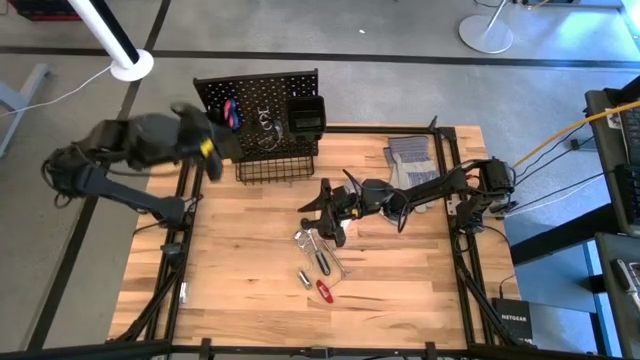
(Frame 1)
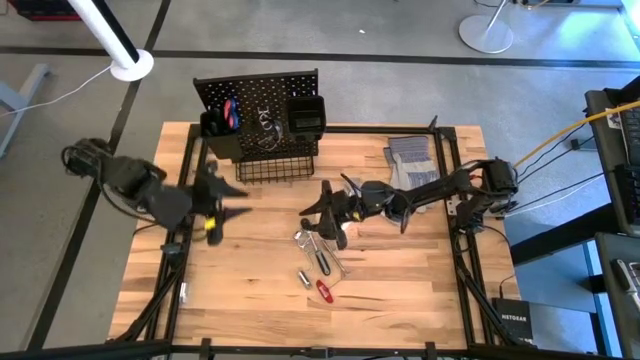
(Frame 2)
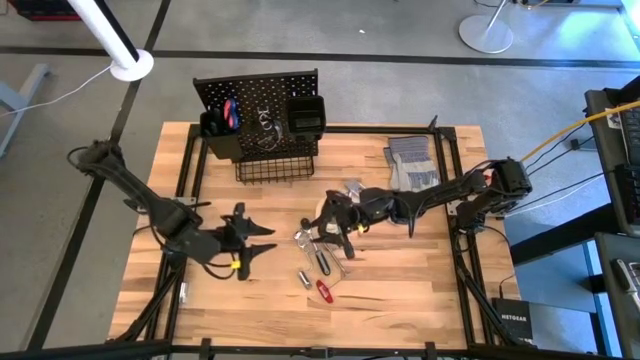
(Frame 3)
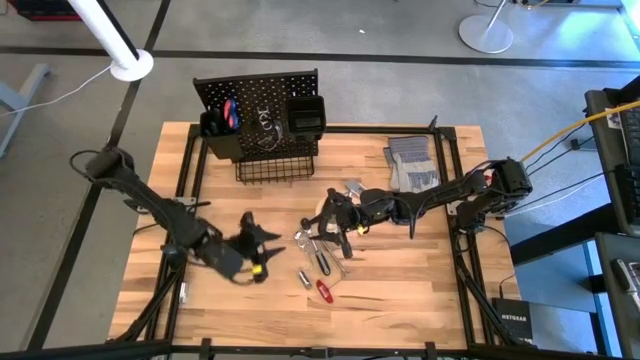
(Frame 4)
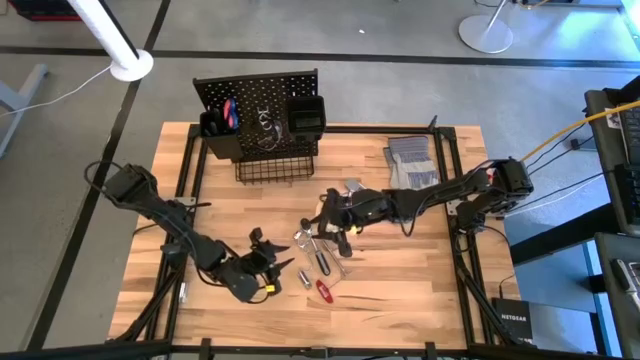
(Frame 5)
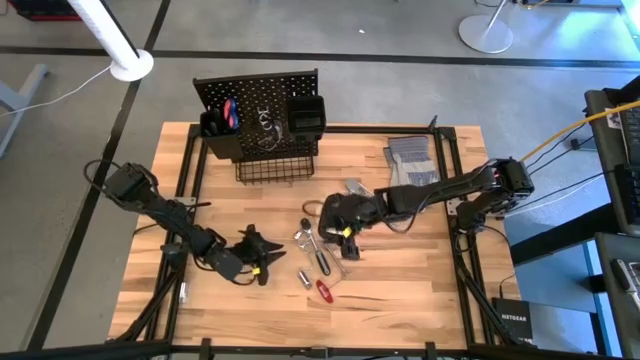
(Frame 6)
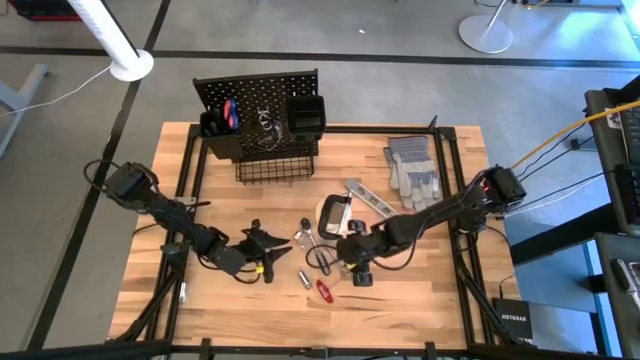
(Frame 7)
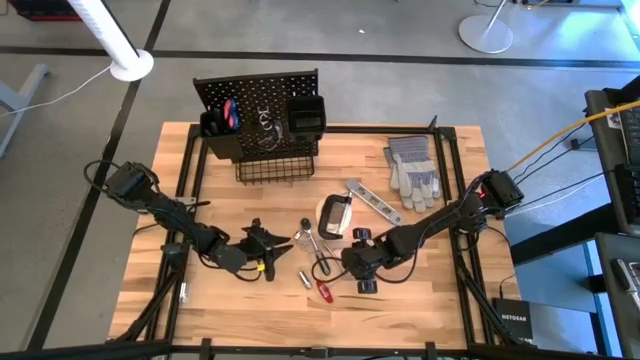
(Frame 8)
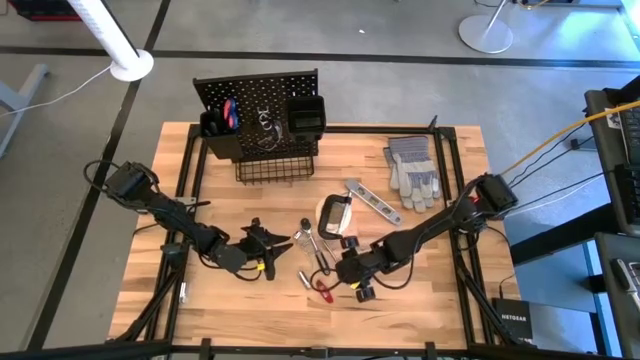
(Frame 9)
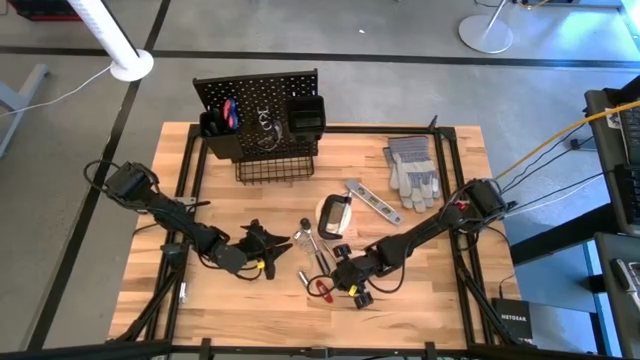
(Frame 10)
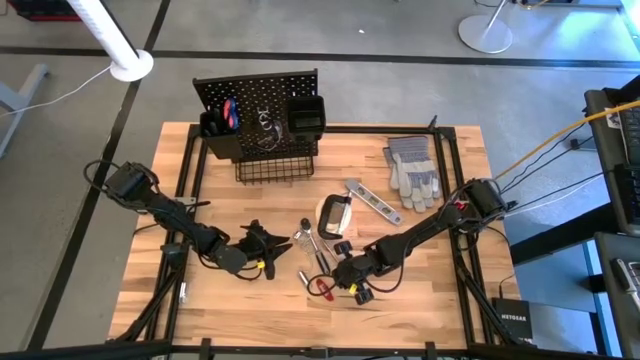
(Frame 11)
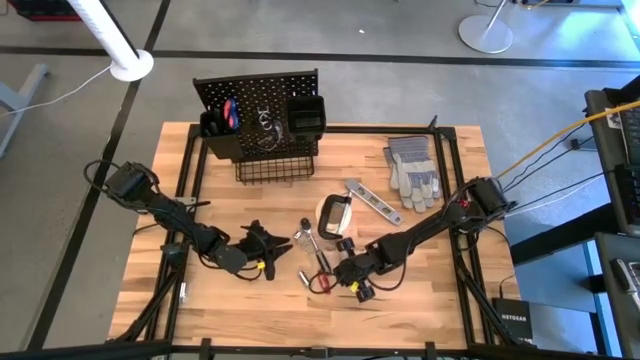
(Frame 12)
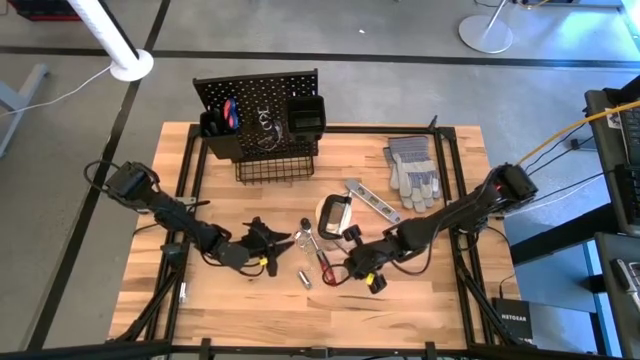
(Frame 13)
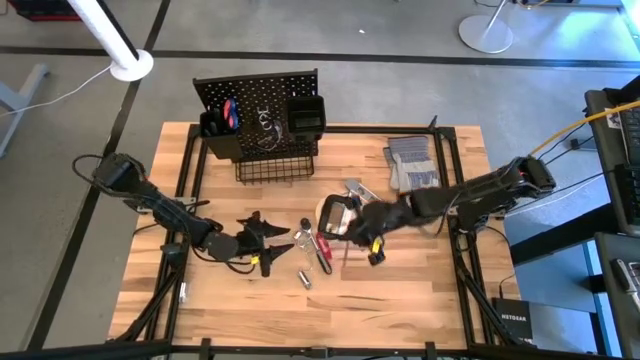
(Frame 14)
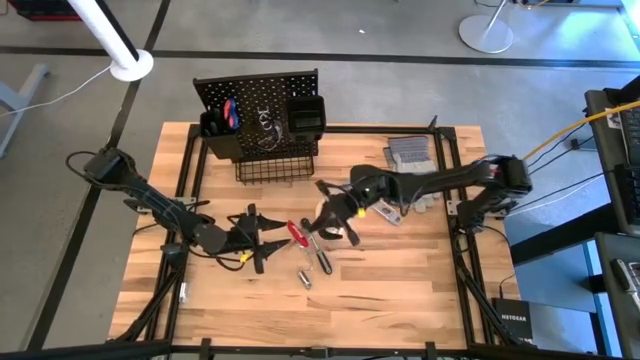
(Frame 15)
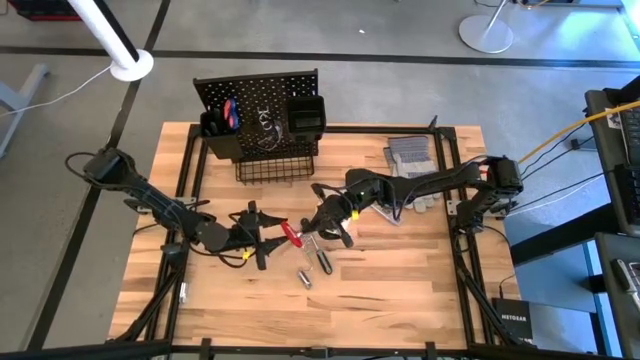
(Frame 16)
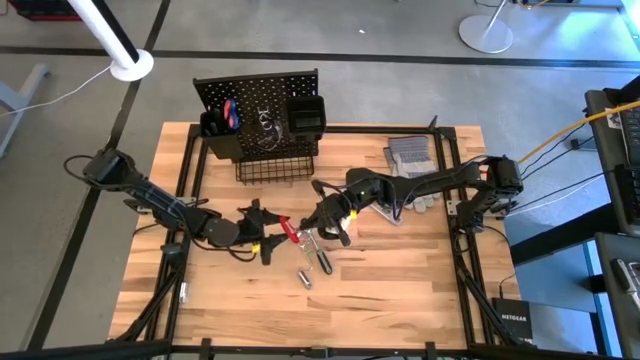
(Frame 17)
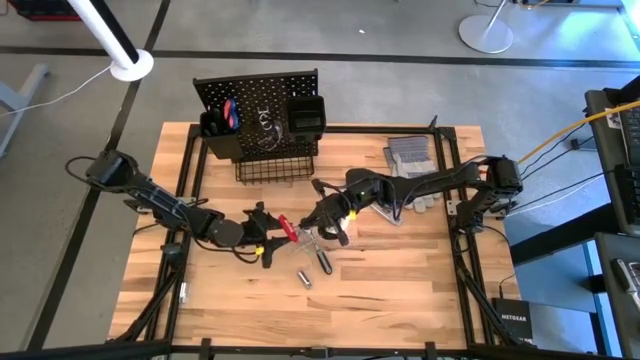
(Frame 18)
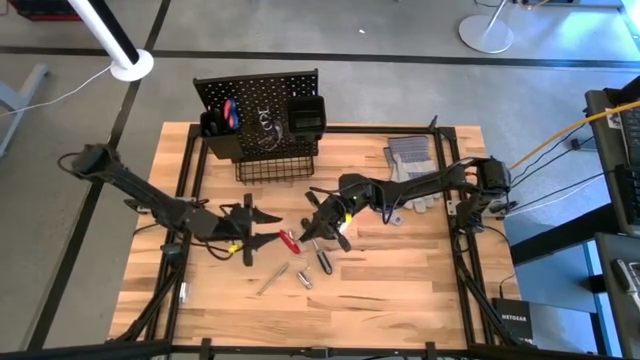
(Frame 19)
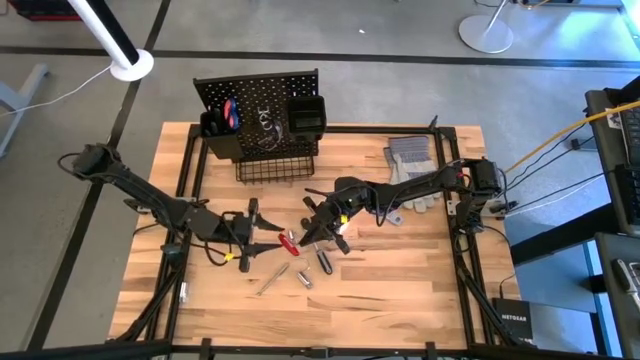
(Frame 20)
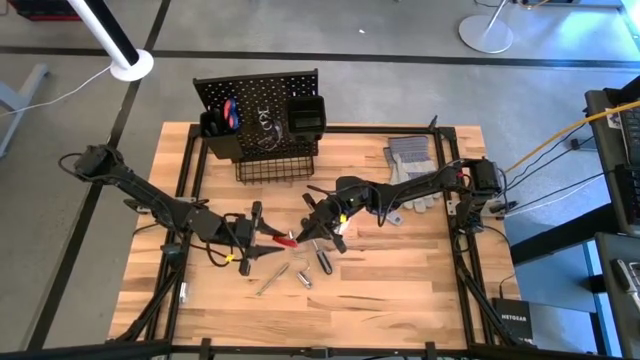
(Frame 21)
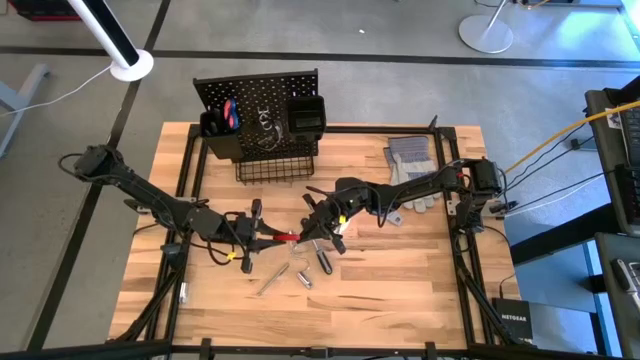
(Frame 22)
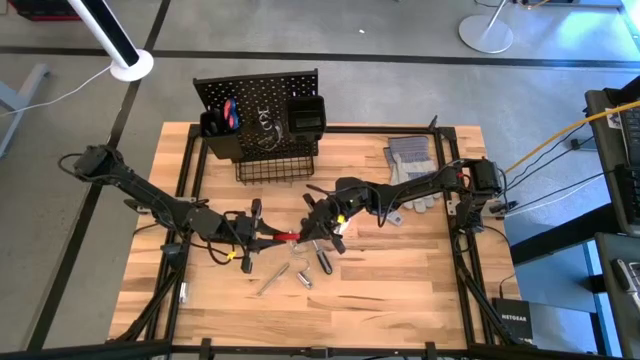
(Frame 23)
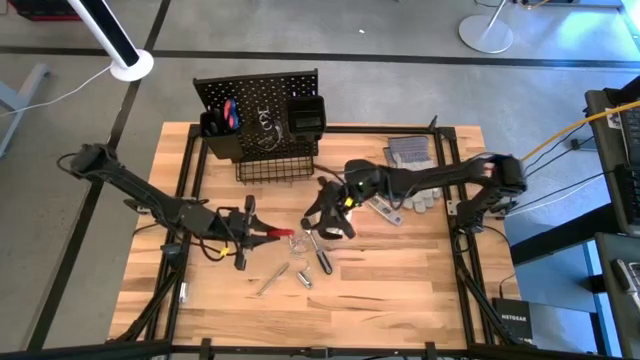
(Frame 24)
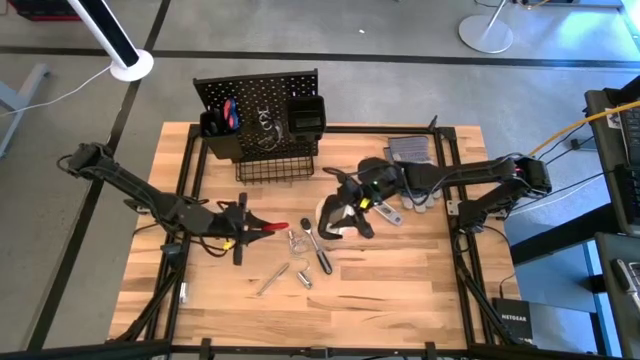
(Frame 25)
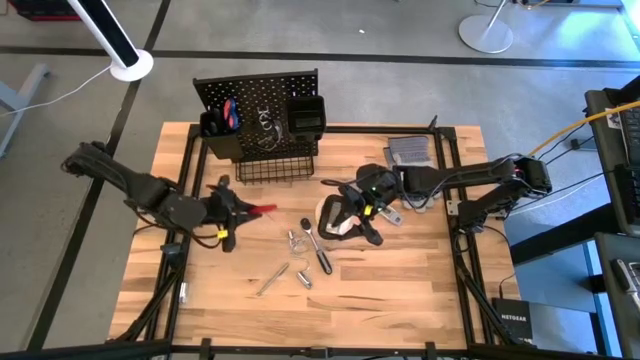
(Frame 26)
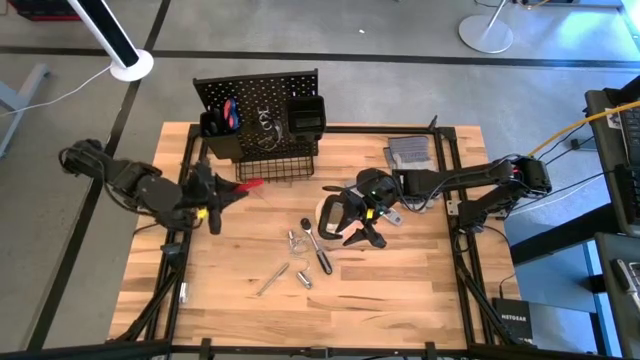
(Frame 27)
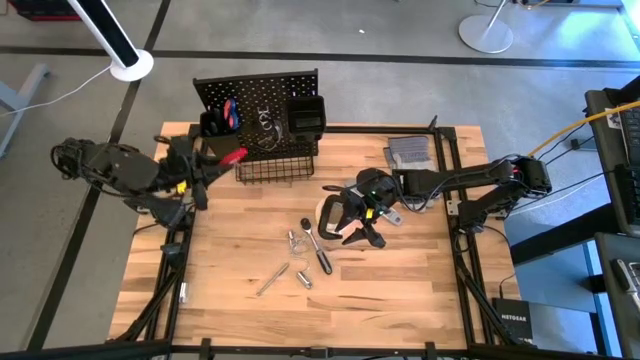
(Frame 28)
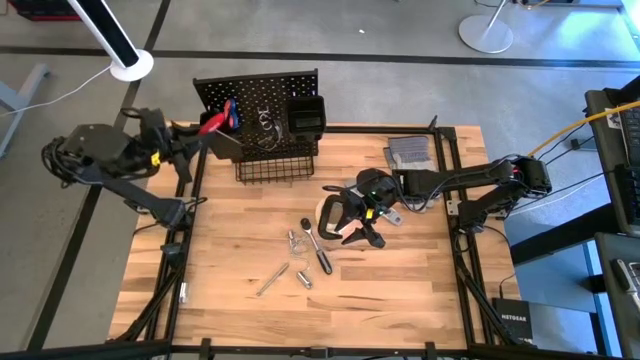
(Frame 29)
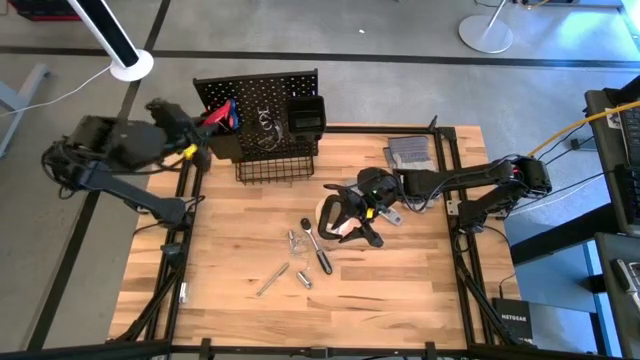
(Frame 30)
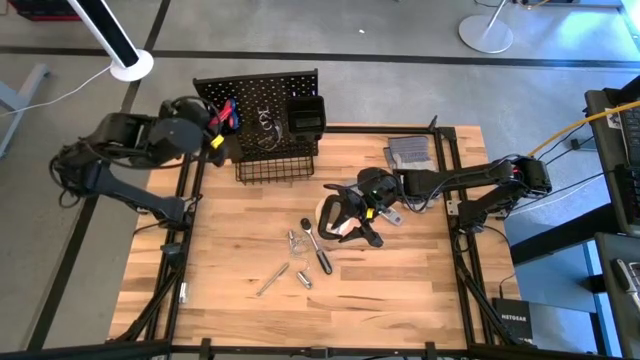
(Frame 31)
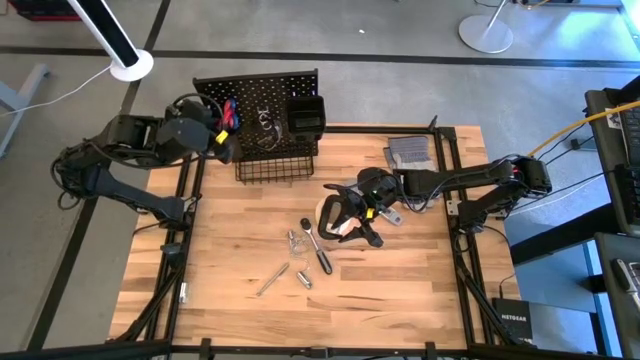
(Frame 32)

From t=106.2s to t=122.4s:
Task: Hang tools onto peg board
Put the red allen wrench into the left black bin on the pegboard

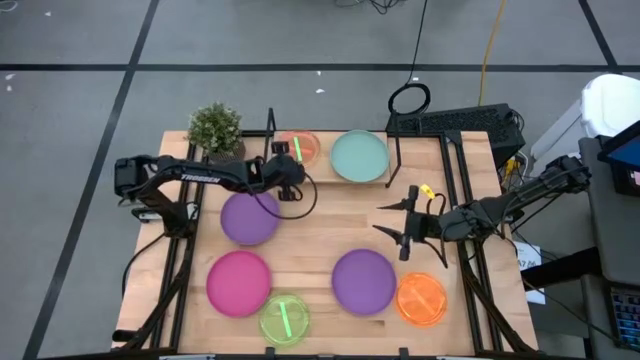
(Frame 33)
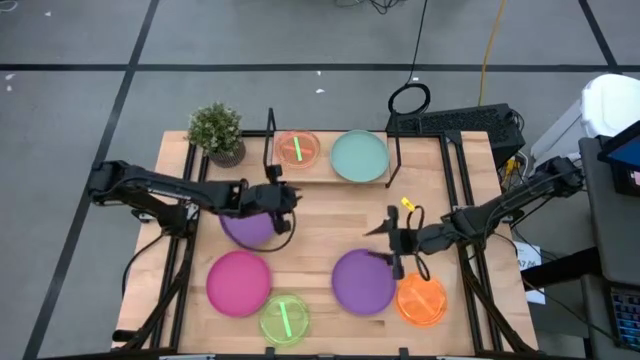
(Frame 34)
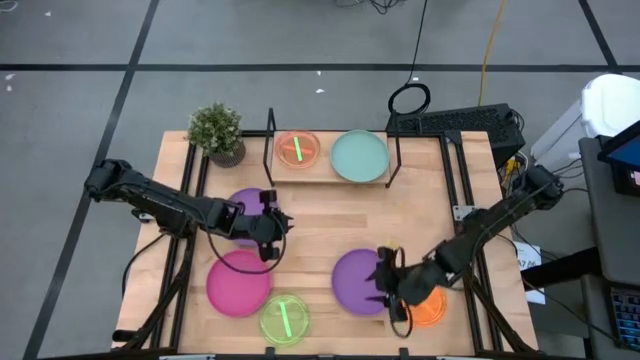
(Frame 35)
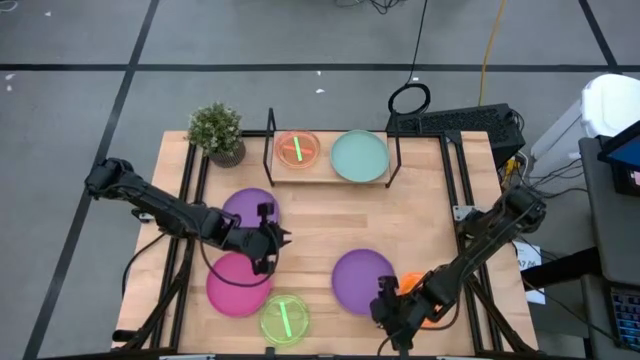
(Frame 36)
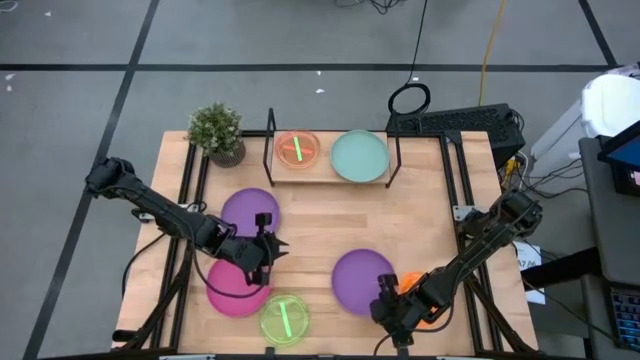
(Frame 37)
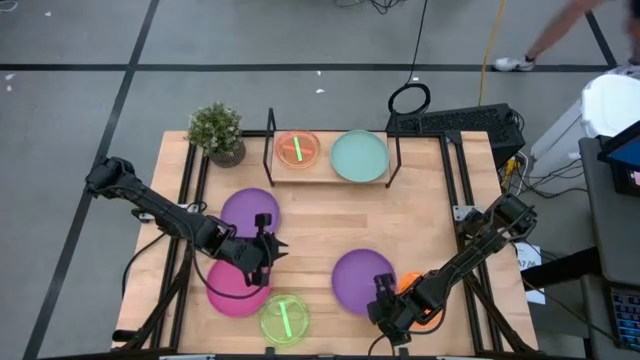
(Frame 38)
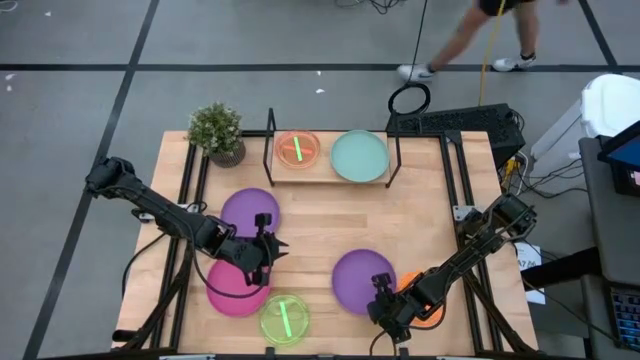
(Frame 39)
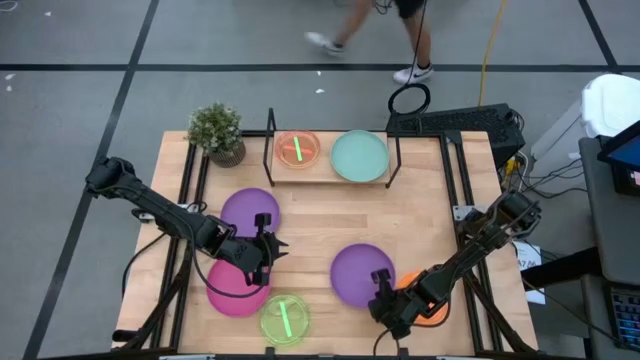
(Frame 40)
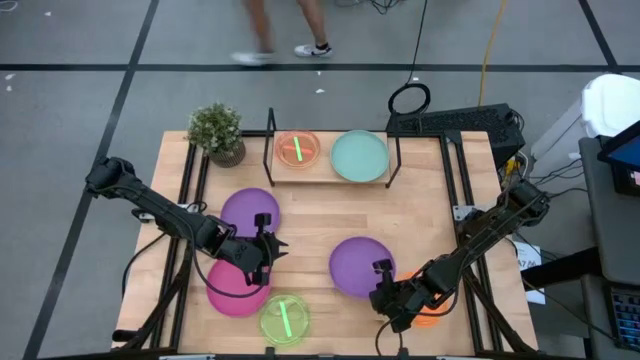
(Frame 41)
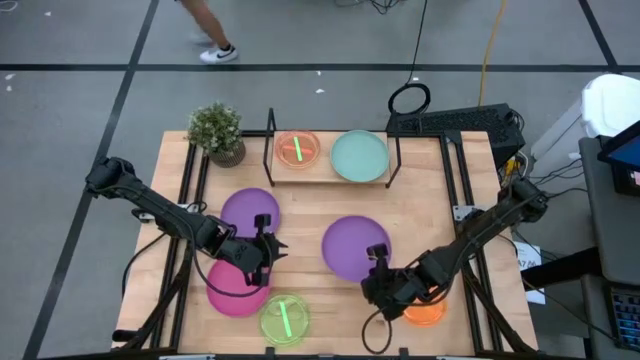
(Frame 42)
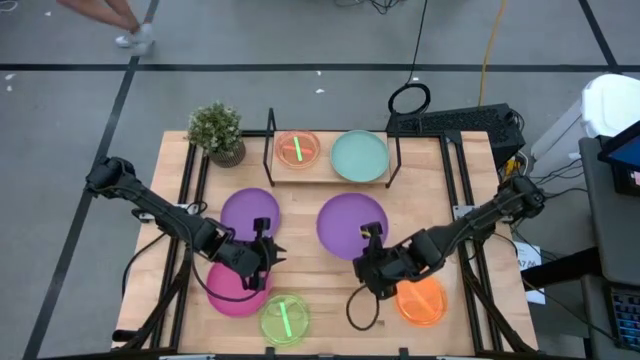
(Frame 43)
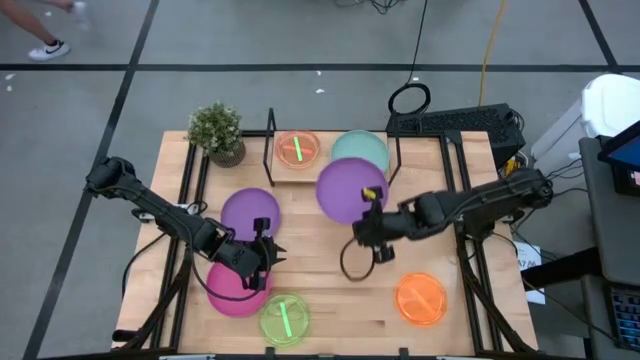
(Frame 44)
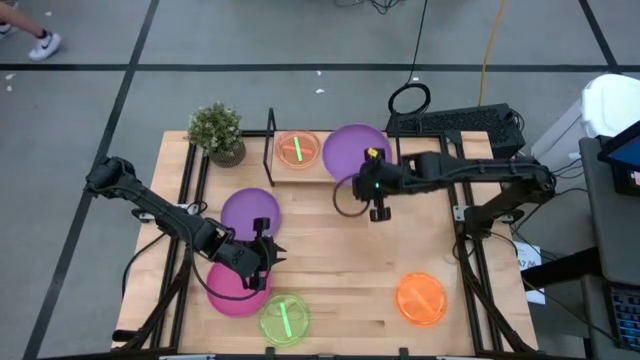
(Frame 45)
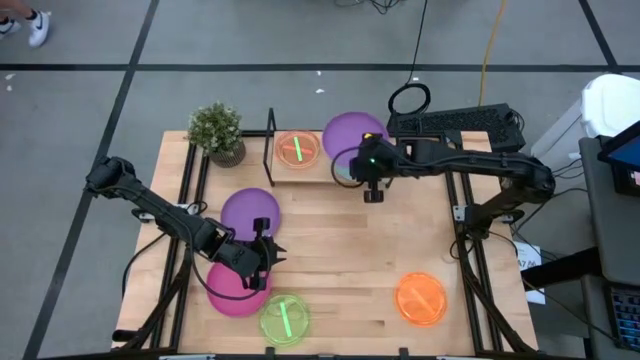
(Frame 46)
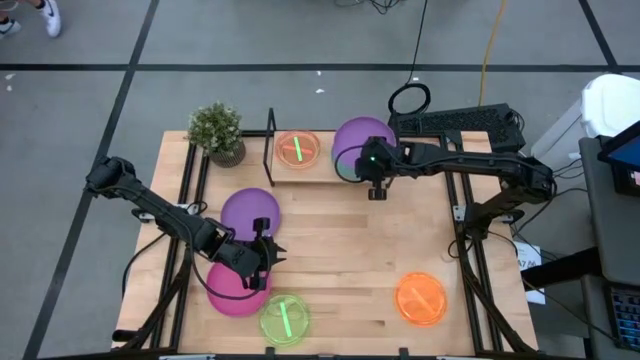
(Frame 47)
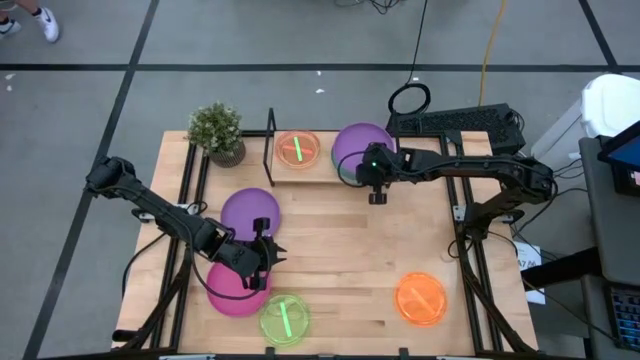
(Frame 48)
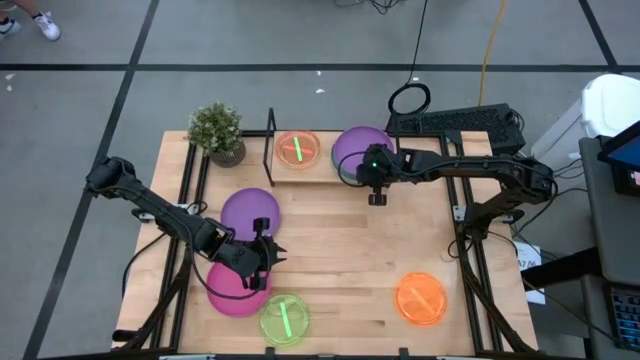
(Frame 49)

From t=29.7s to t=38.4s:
Task: Place and stack plates onto a shelf
Stack the bottom purple plate on top of the light blue plate
